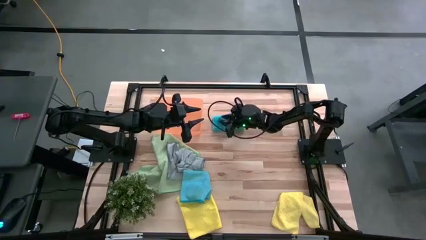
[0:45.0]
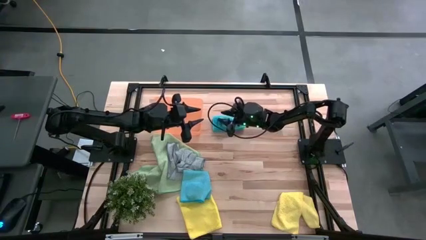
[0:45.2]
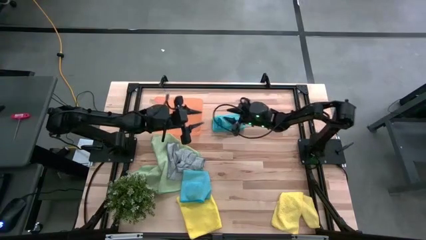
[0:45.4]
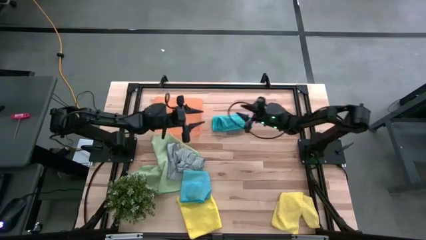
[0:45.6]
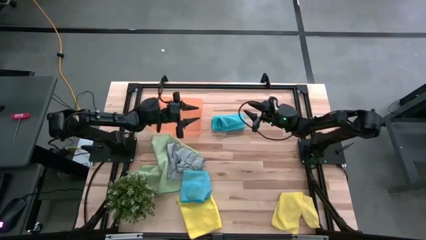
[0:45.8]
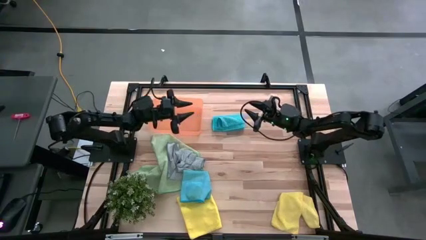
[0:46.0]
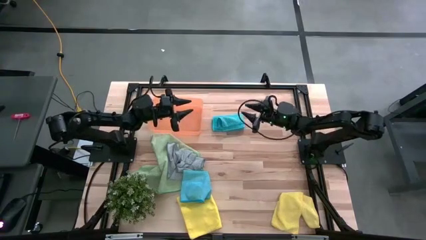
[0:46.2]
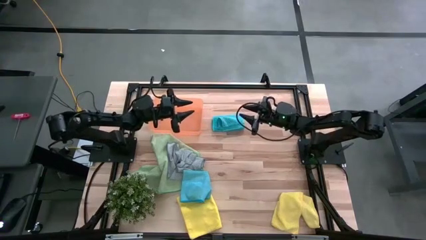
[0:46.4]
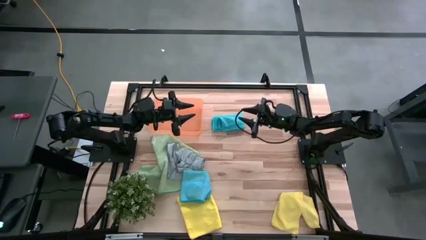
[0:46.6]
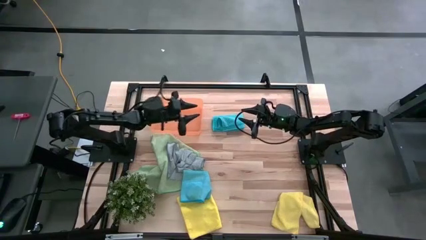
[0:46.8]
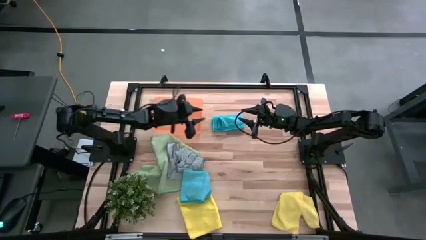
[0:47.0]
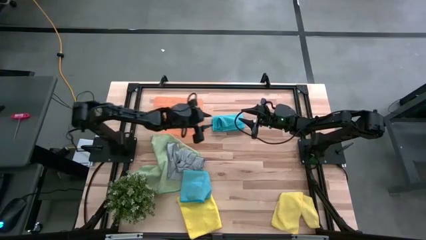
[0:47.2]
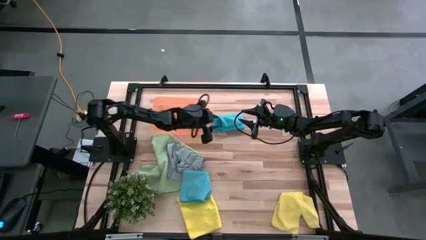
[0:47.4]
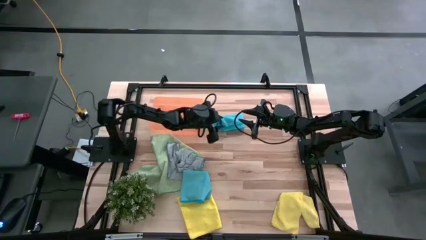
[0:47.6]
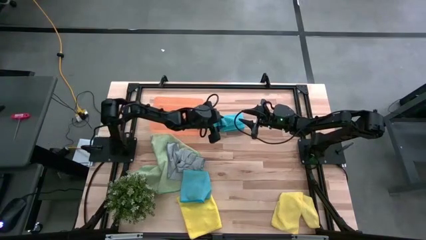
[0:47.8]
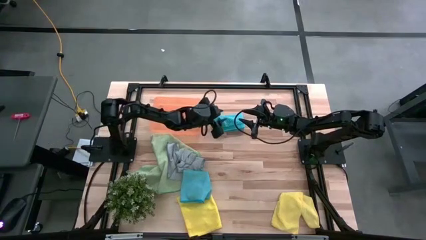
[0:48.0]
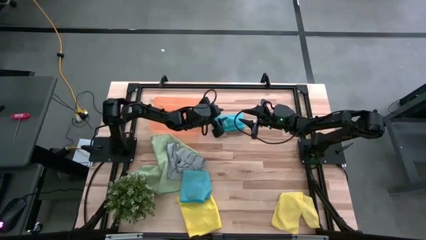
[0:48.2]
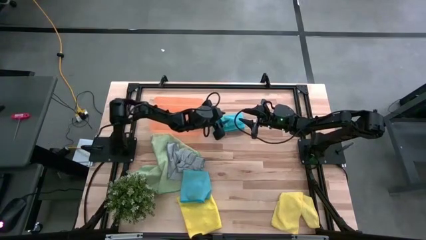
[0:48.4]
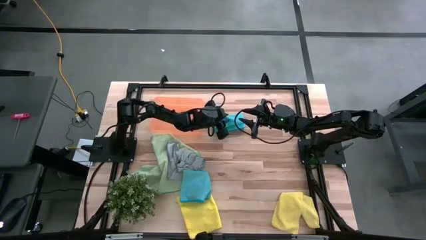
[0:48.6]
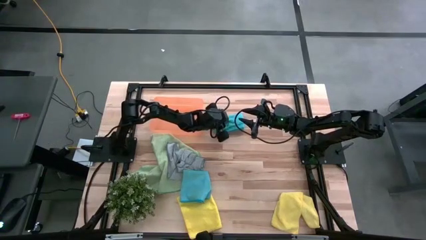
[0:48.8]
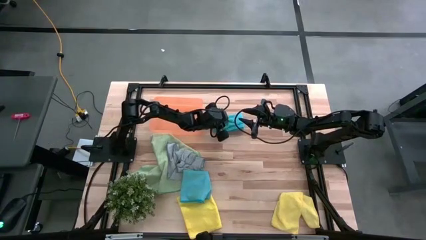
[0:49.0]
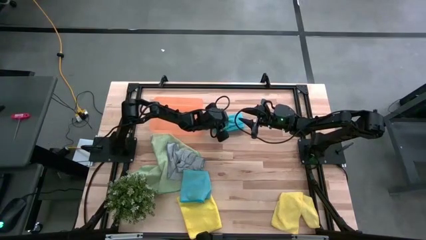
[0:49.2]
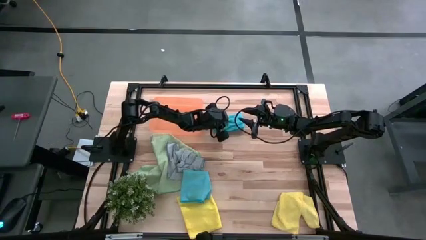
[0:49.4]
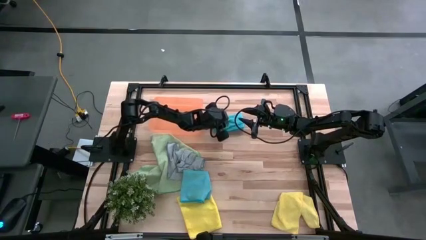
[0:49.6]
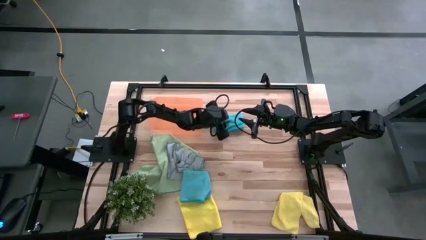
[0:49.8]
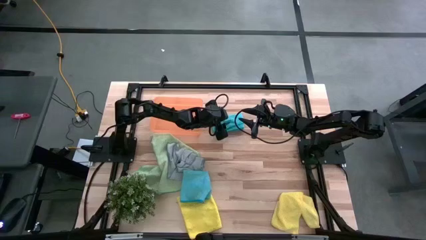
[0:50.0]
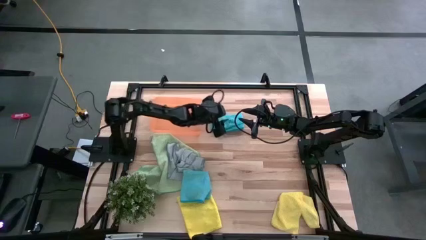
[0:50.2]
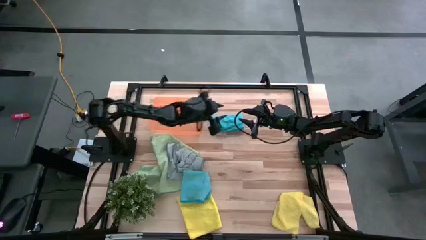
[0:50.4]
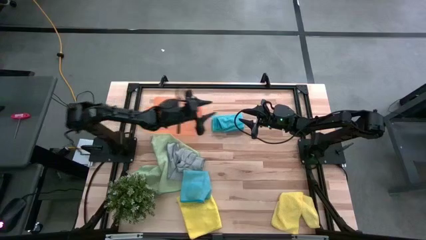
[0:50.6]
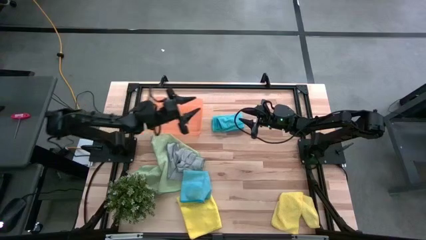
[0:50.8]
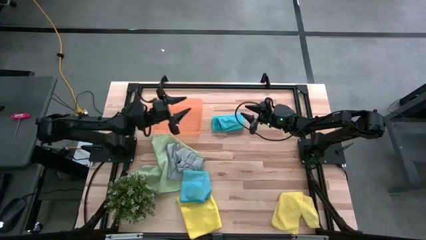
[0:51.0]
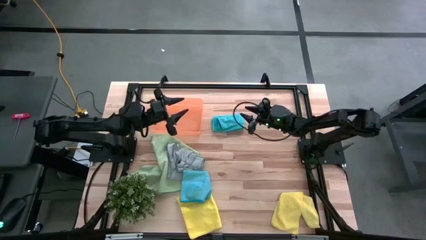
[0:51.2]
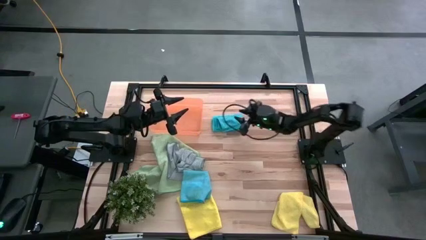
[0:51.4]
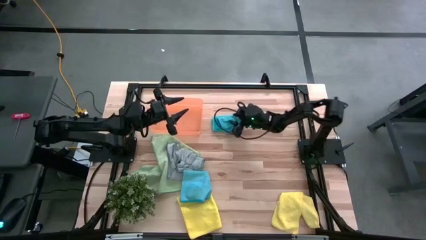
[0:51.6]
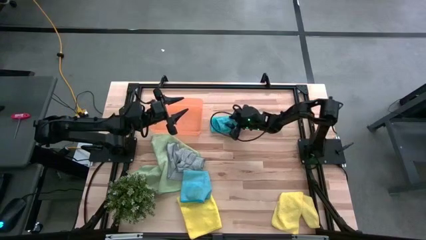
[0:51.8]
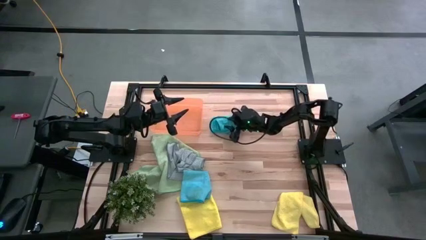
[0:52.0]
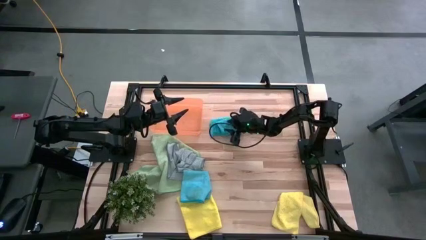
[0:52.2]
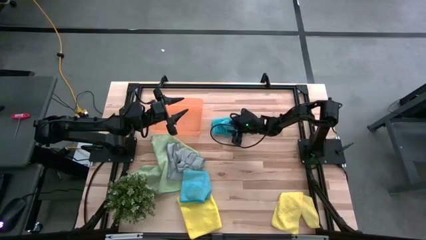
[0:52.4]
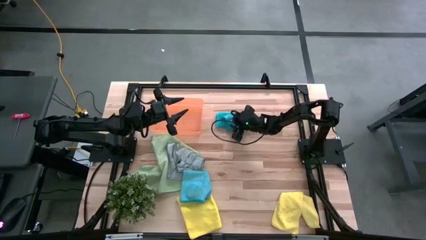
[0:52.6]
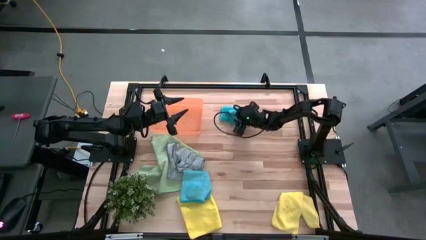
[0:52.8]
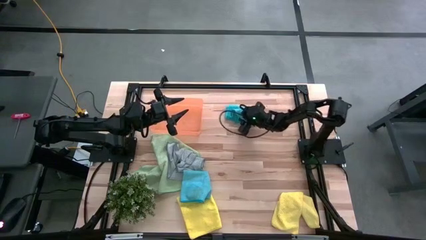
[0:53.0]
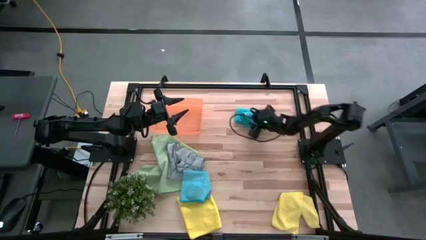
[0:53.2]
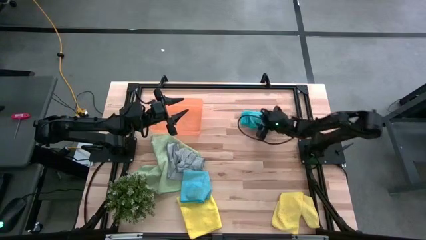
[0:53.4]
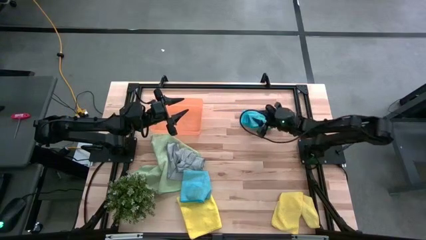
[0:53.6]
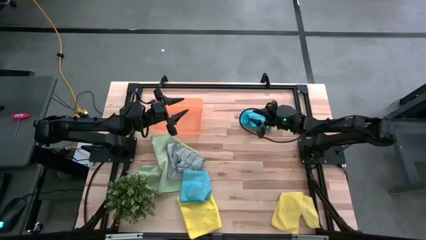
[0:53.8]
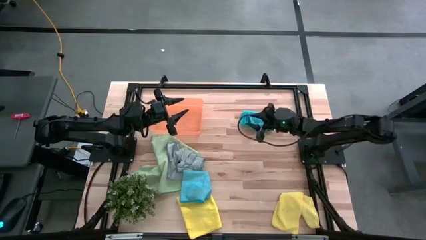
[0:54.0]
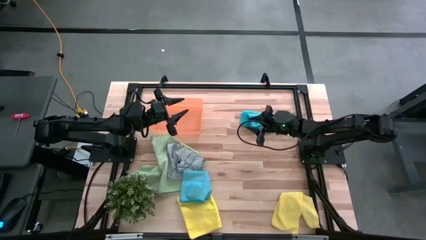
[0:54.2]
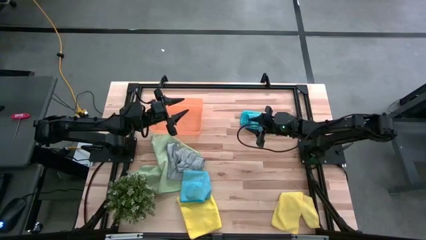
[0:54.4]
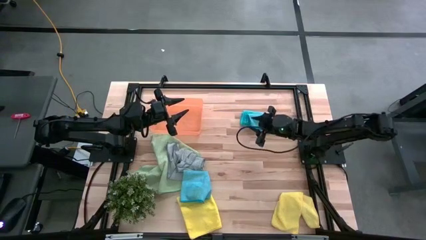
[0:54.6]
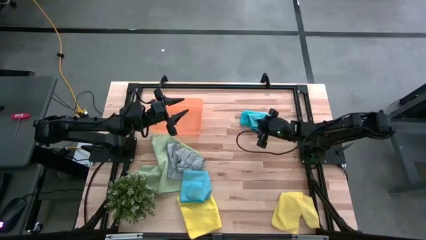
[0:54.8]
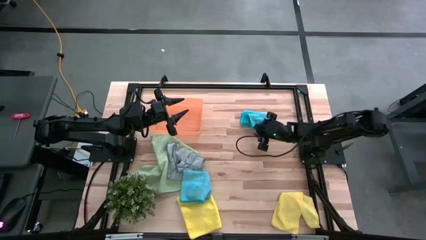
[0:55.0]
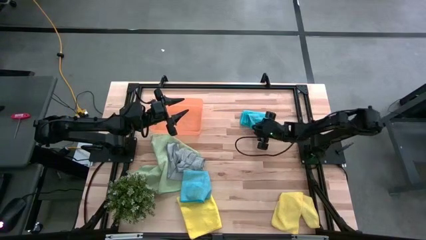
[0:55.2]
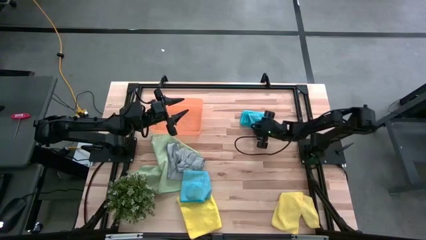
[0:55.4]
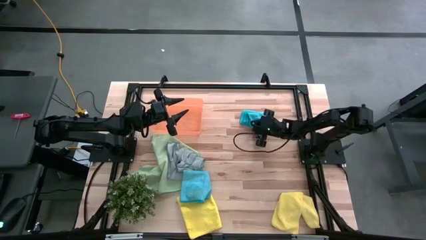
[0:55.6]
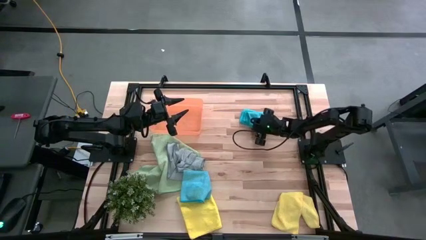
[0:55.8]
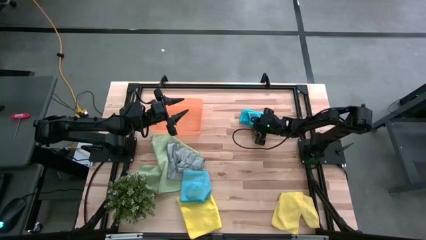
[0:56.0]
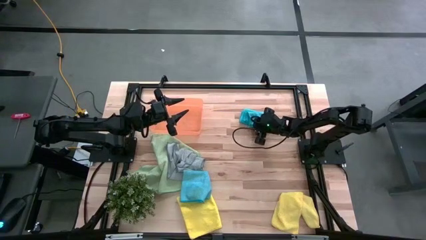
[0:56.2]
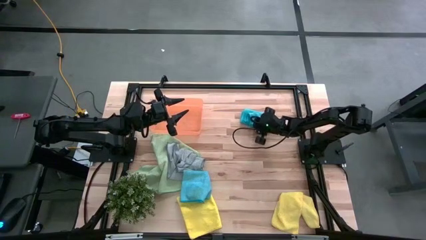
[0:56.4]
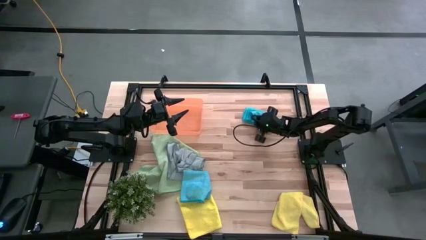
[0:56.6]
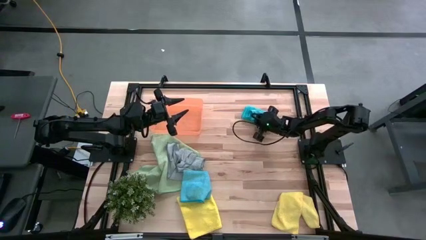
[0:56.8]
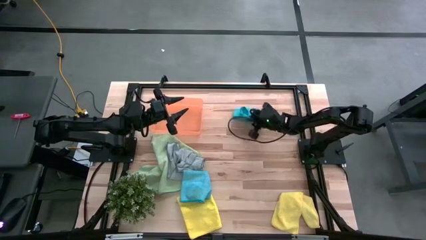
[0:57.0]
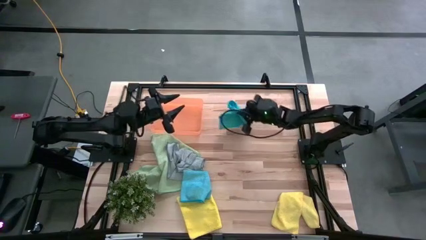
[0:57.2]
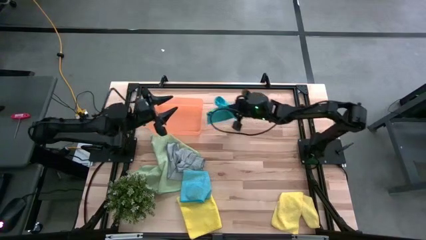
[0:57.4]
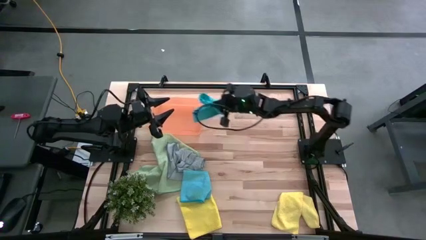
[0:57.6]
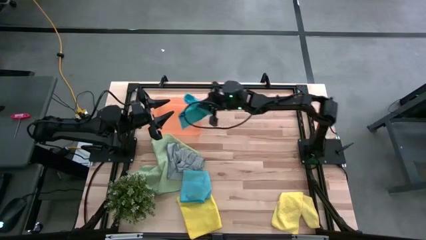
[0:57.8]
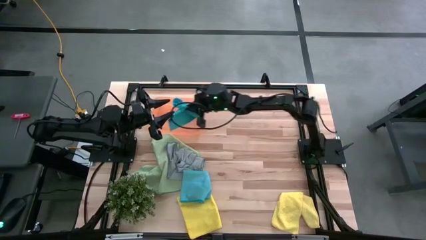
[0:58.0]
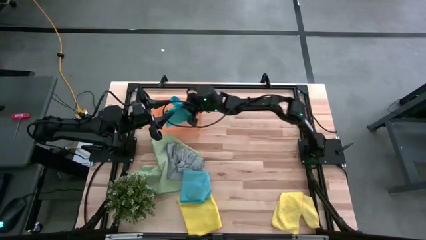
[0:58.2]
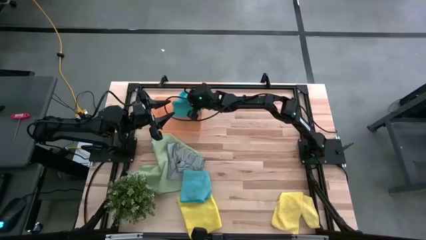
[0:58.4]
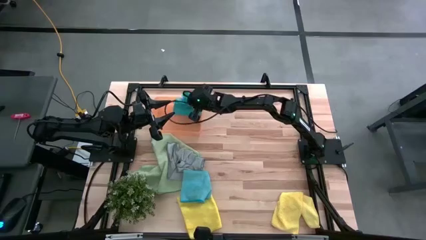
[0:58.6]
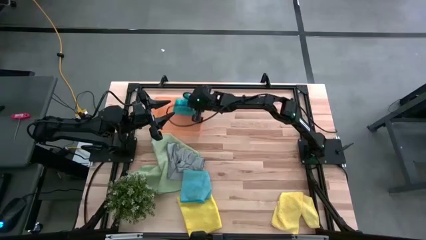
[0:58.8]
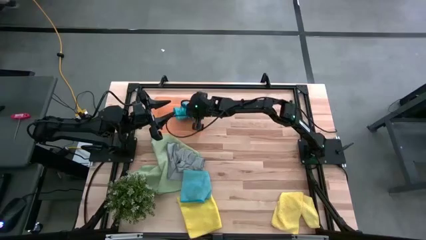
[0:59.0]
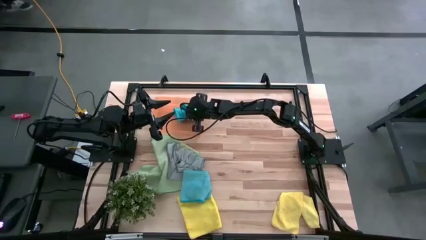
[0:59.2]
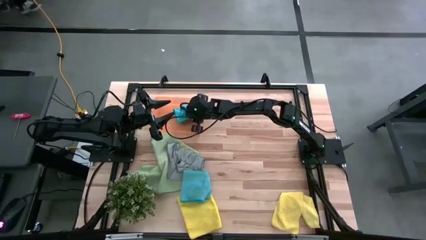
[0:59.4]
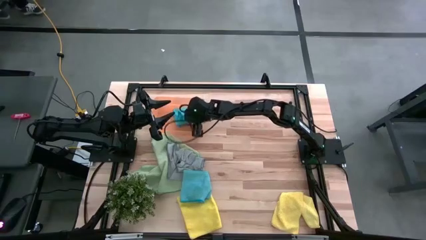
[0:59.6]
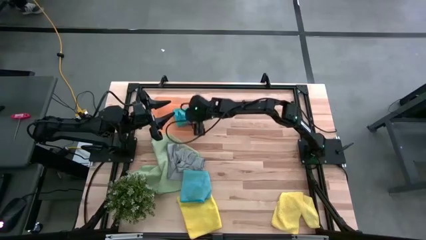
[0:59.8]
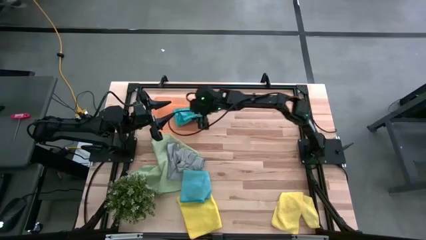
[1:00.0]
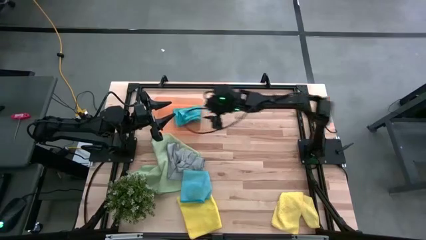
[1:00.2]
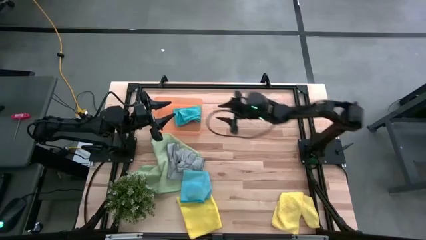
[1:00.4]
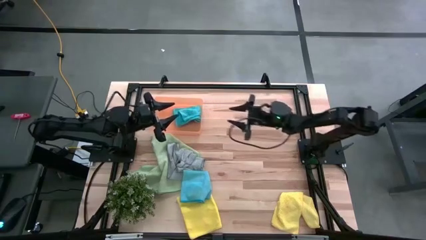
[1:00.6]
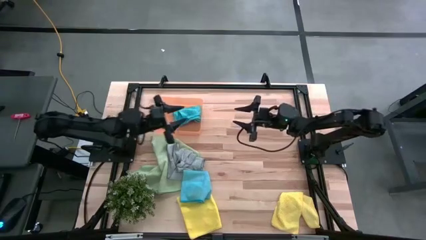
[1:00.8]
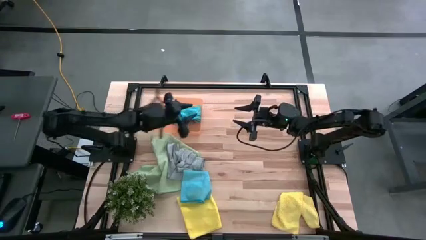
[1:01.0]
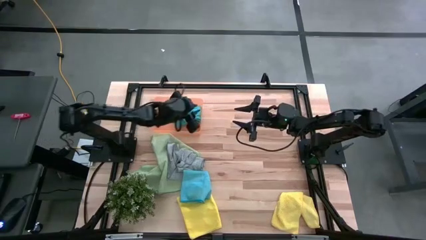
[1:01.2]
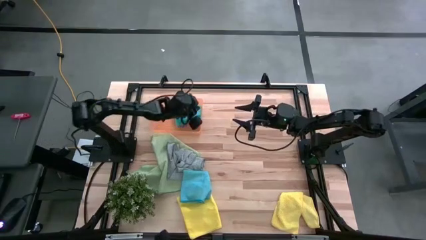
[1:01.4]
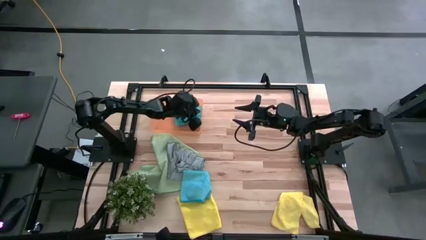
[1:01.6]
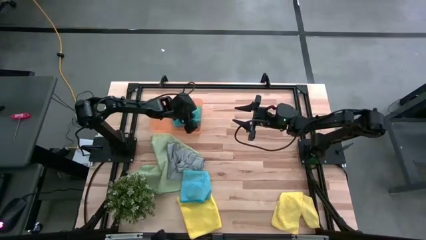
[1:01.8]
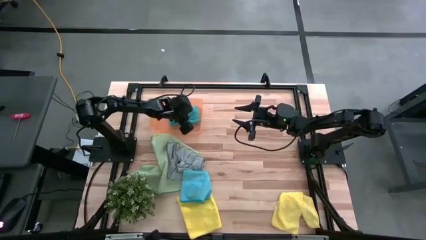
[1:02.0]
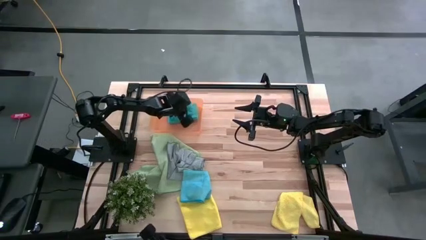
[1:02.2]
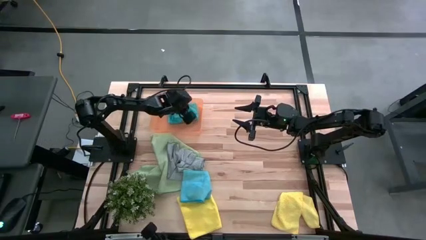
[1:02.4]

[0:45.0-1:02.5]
Task: Fold microfiber towels
Put the blue microfiber cloth into the orange bin
